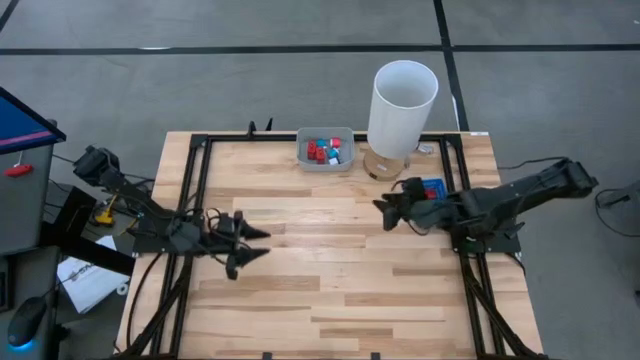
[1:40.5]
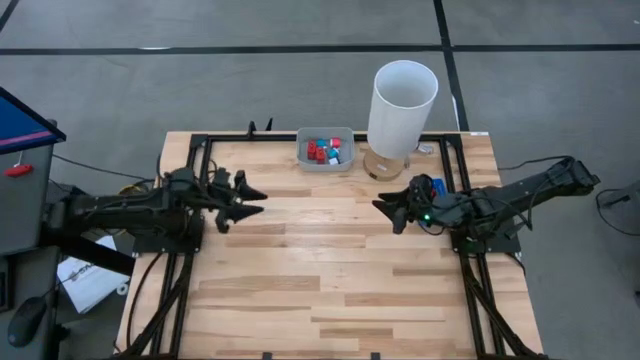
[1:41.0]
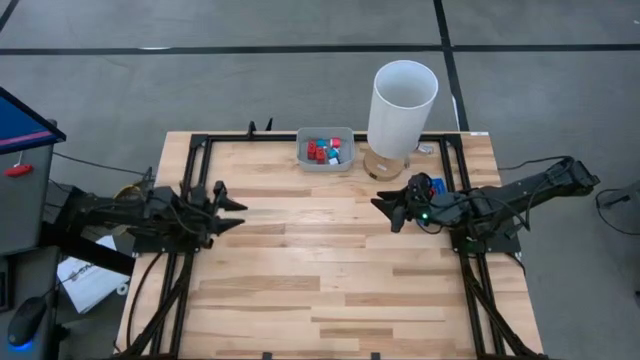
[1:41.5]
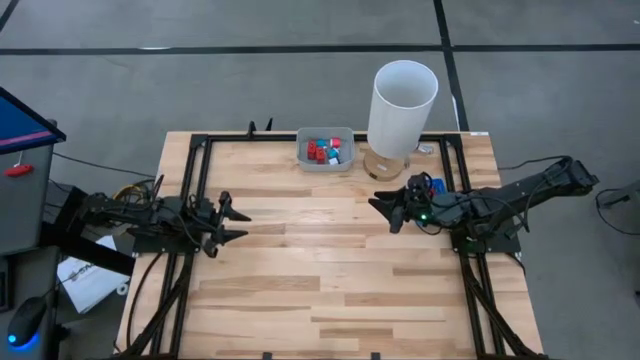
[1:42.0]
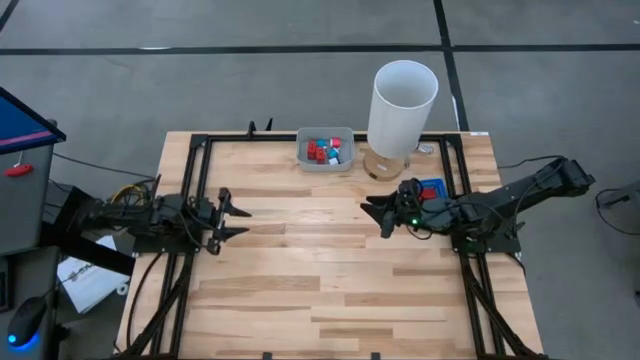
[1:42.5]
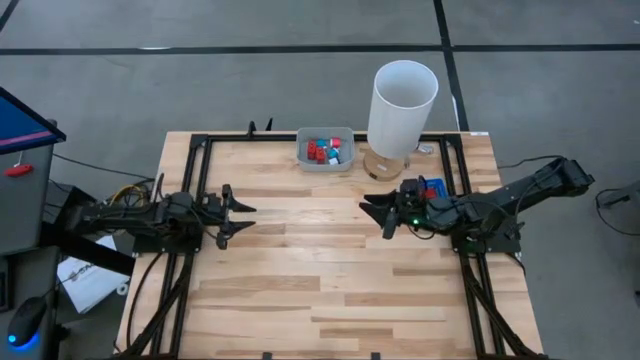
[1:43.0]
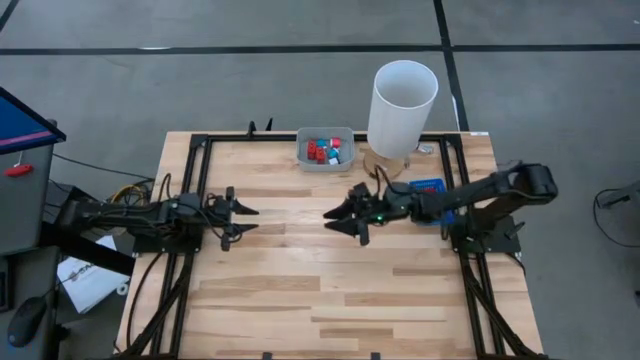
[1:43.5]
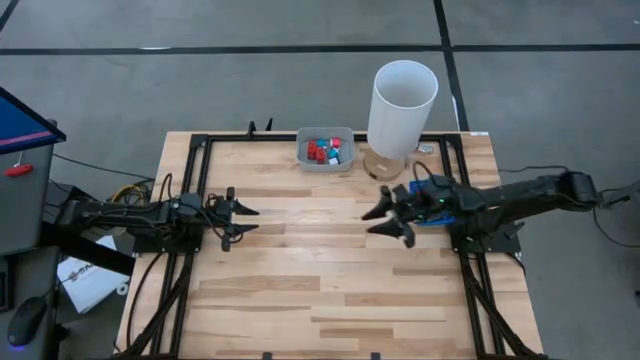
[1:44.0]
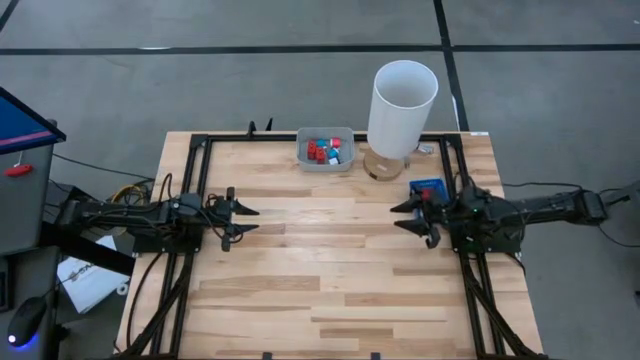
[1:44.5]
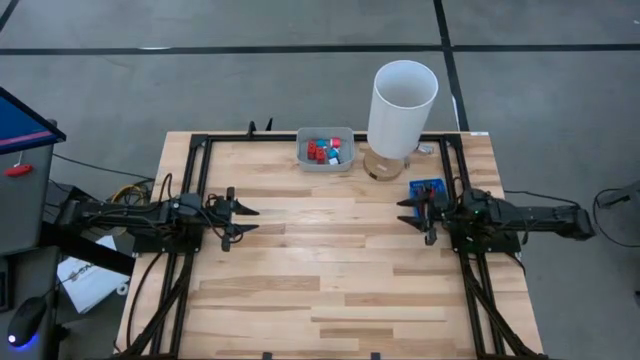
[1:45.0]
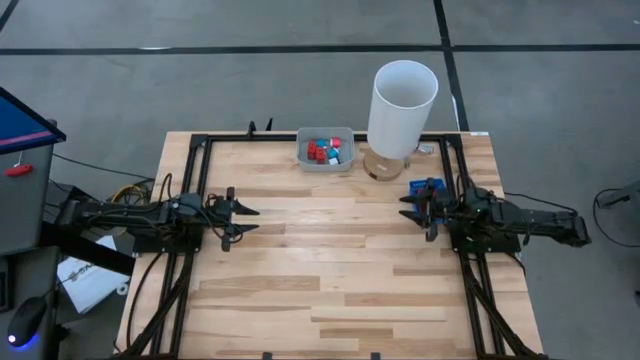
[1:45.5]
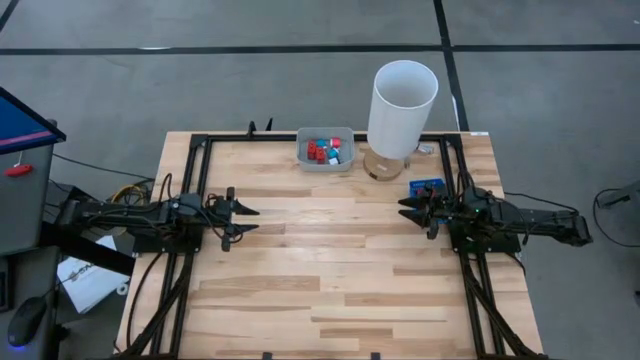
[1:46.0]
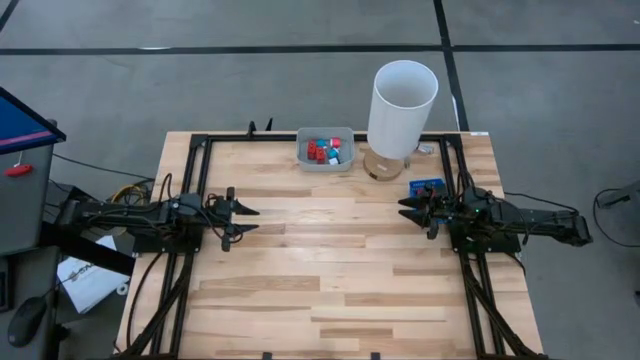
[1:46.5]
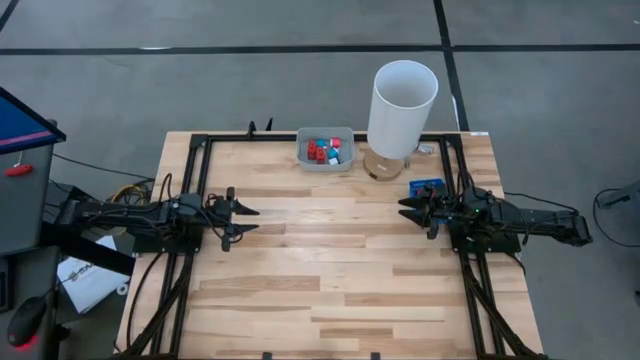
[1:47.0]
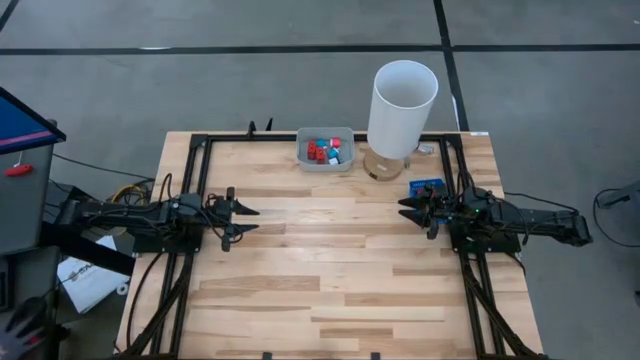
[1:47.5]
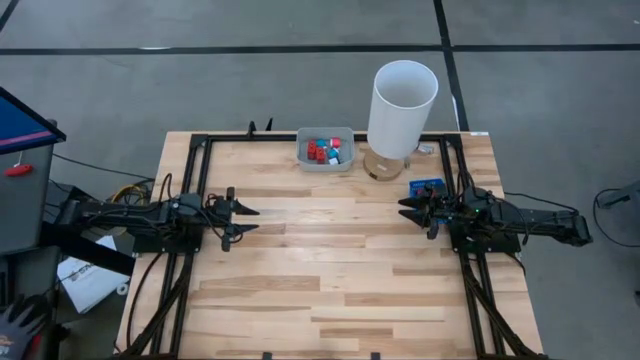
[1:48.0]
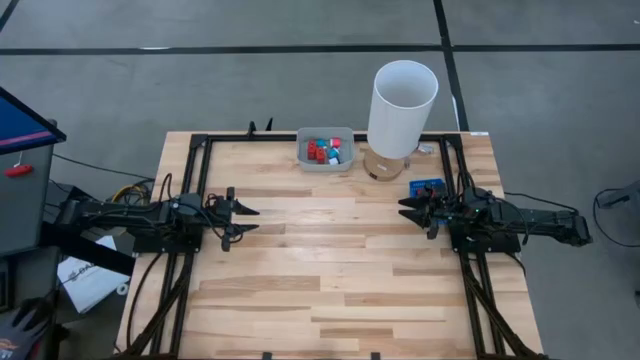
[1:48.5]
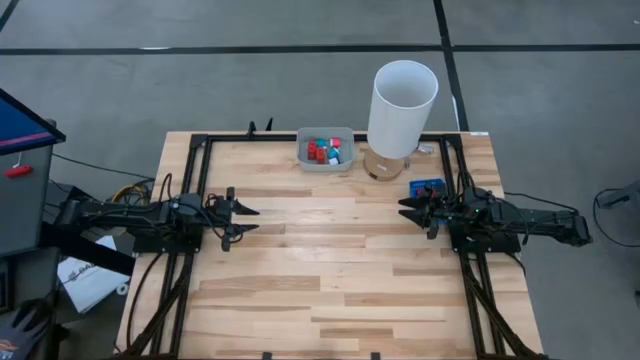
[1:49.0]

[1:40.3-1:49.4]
Task: Pick & Place Office items
Return to Home Position

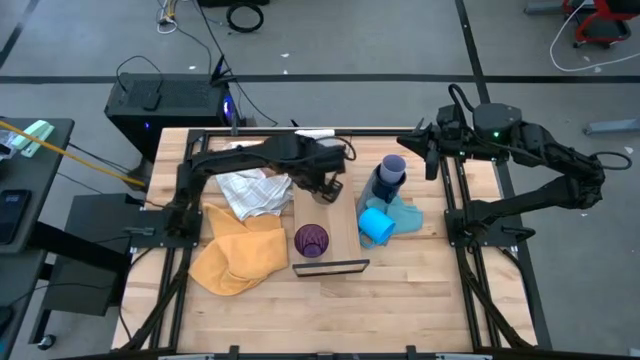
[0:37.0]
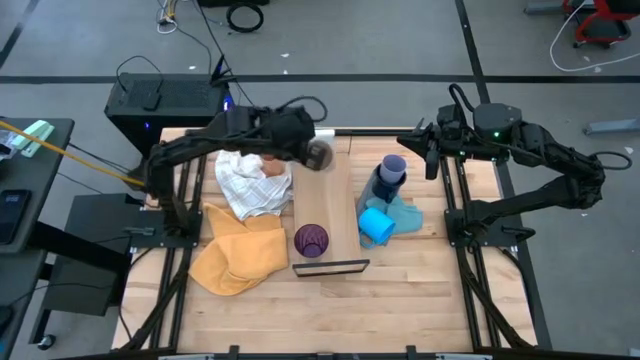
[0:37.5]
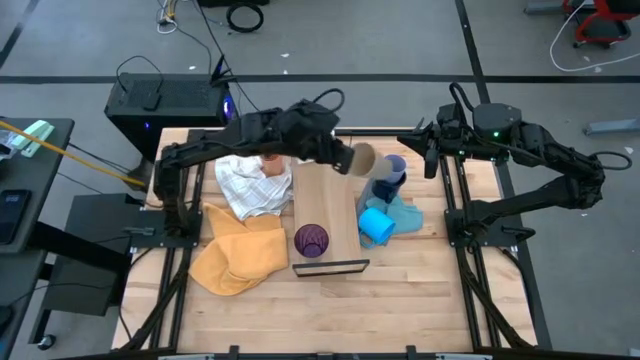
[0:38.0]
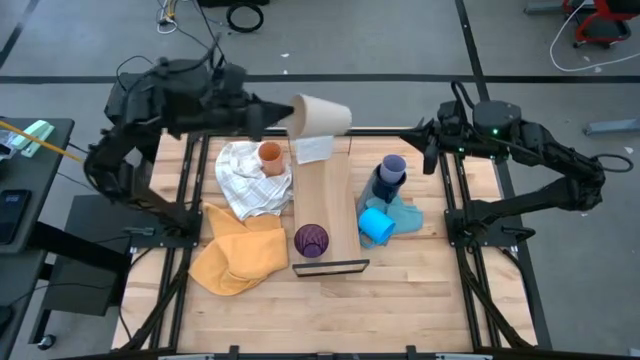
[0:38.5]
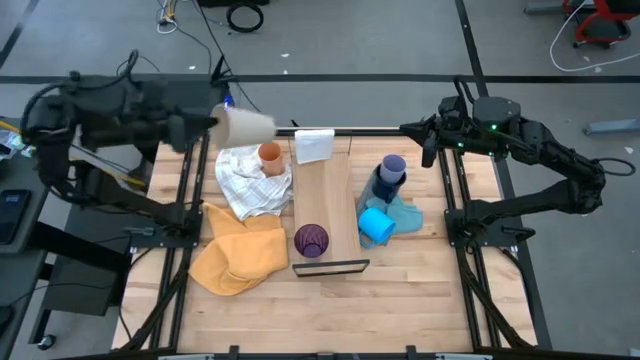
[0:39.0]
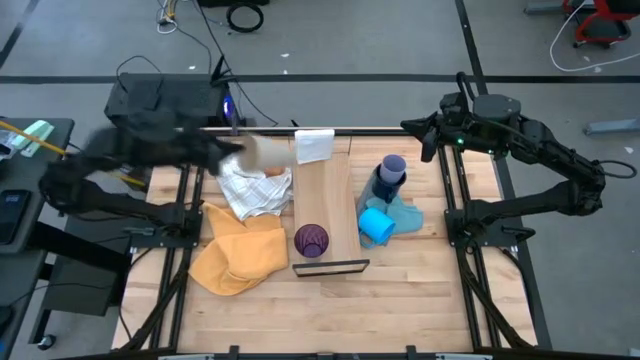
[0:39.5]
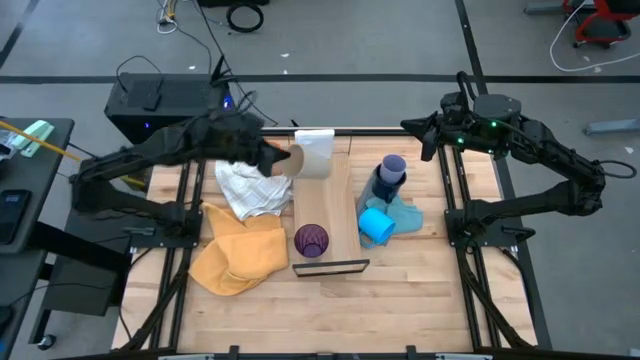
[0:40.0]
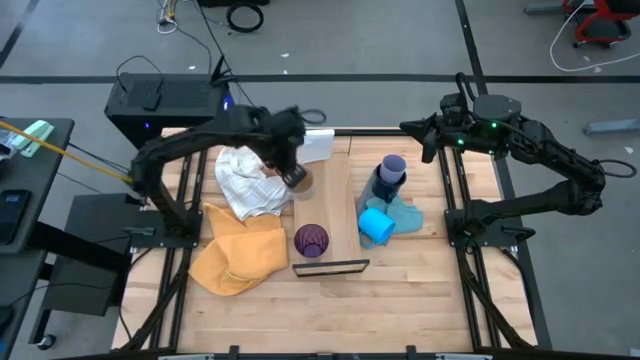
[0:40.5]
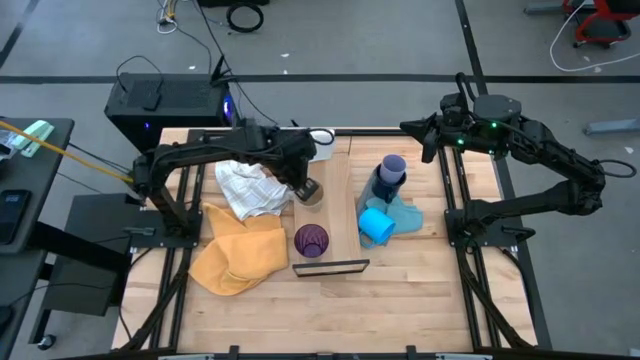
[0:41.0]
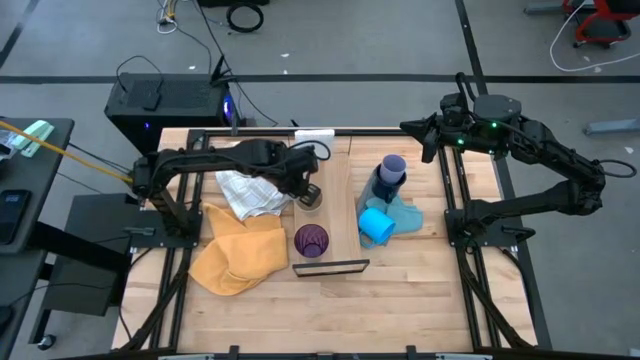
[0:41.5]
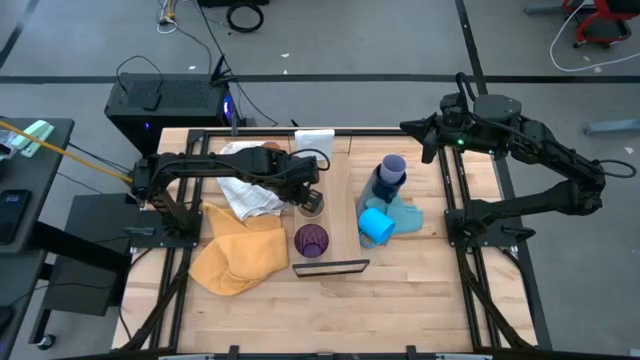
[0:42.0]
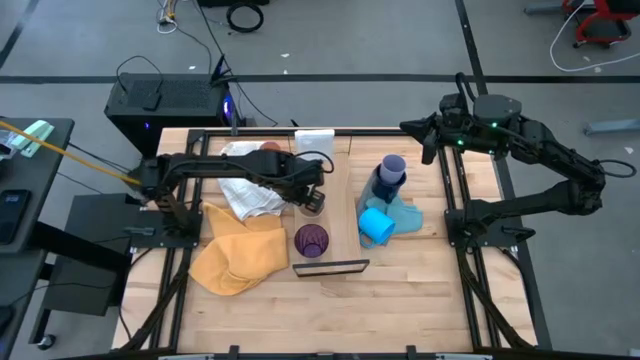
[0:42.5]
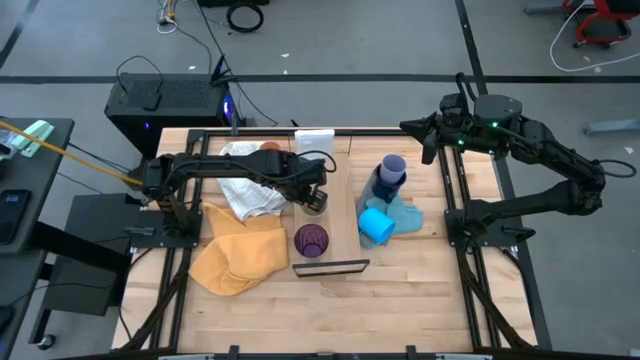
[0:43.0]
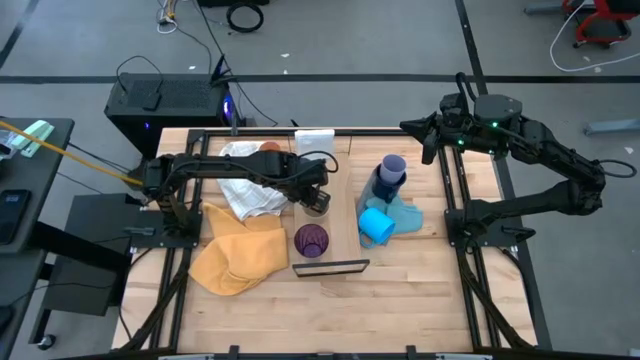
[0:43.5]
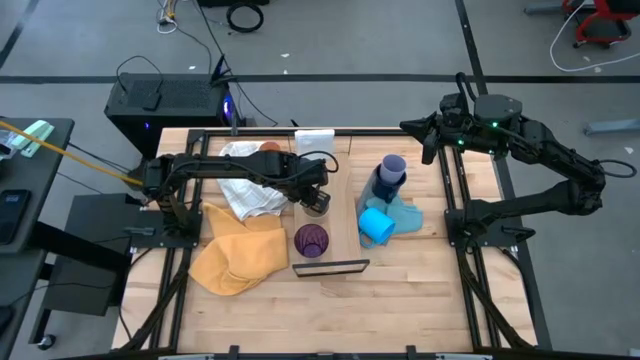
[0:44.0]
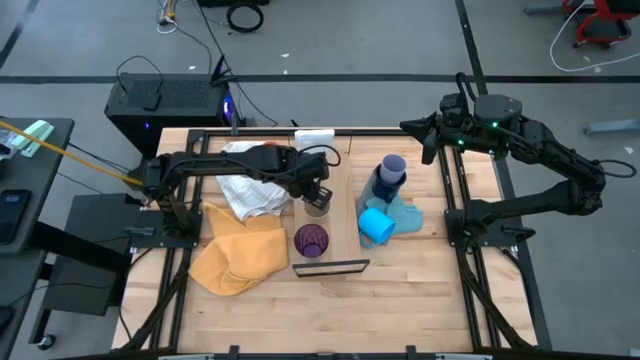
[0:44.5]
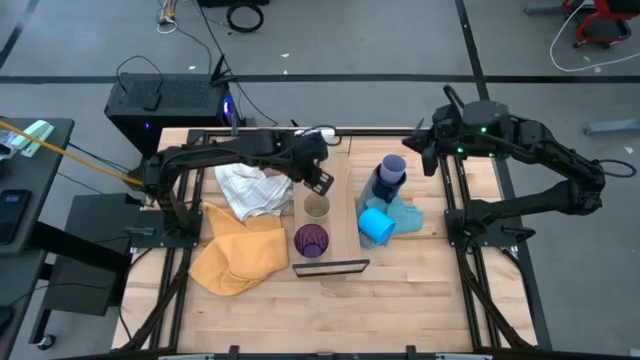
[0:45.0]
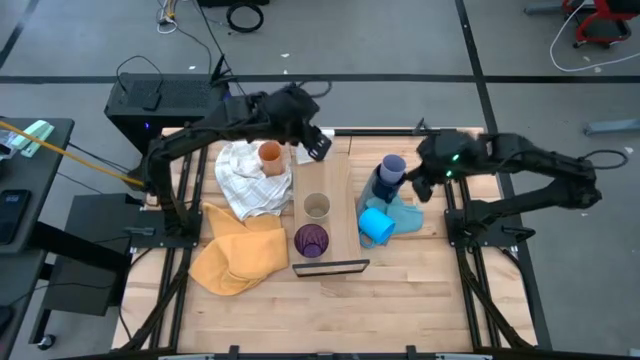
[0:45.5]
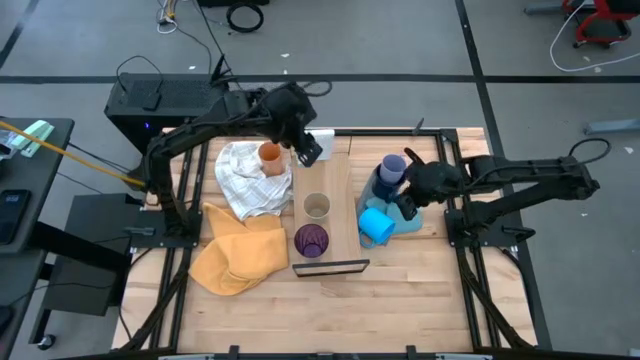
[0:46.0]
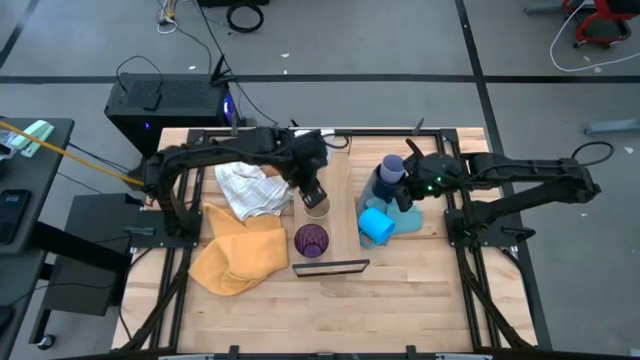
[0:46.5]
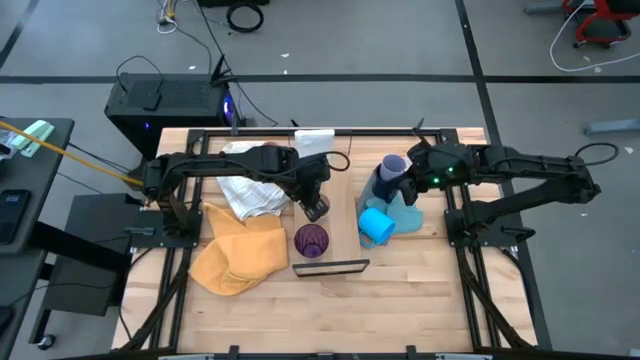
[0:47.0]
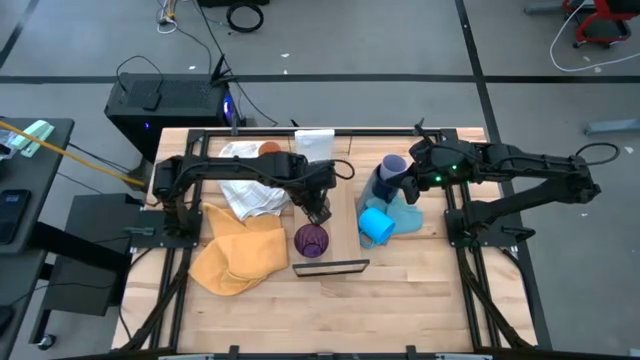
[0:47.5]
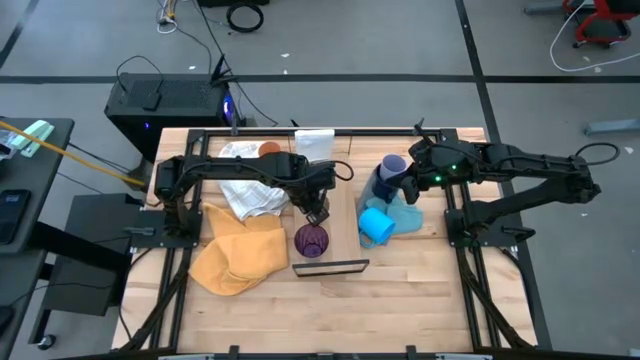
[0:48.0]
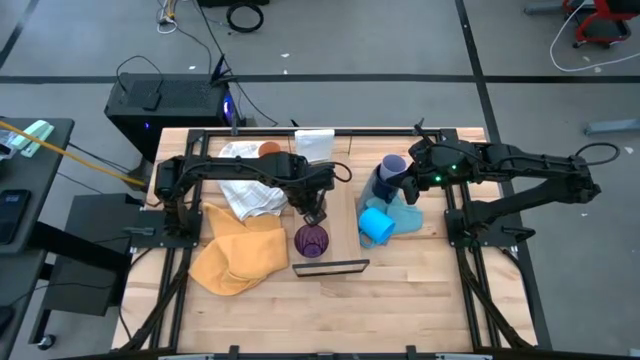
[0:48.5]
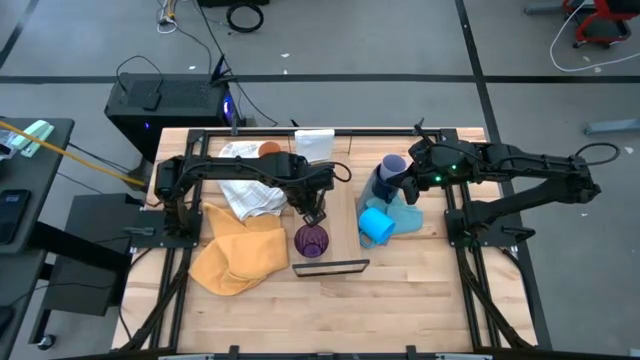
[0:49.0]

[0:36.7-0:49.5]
Task: Stack small to large cups/mugs on shelf
Put the brown cup on the shelf
